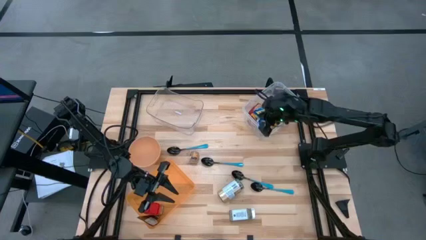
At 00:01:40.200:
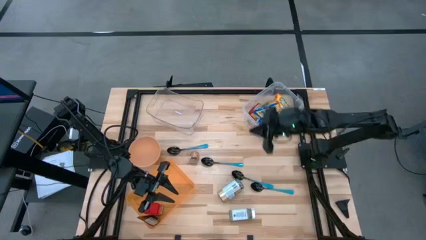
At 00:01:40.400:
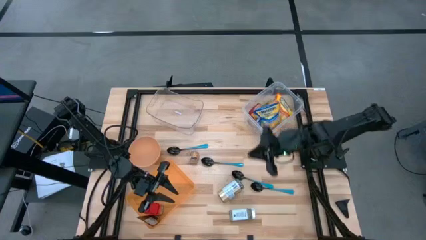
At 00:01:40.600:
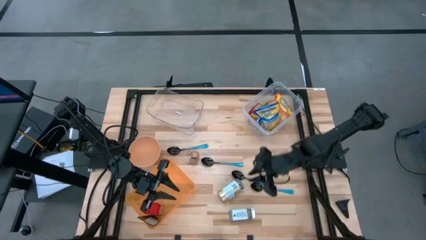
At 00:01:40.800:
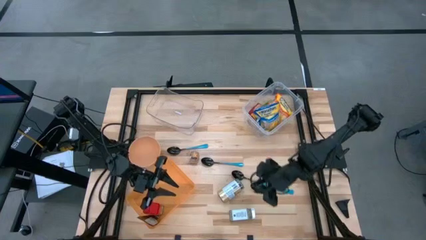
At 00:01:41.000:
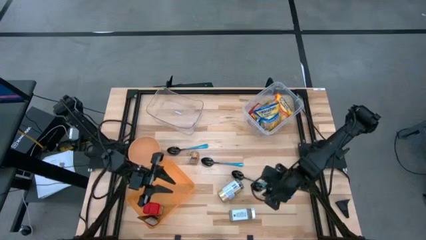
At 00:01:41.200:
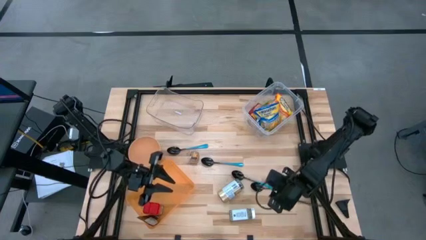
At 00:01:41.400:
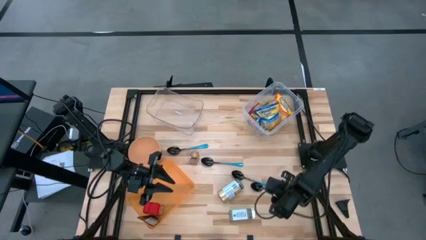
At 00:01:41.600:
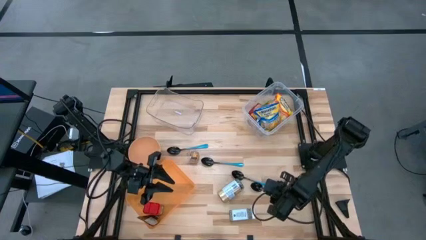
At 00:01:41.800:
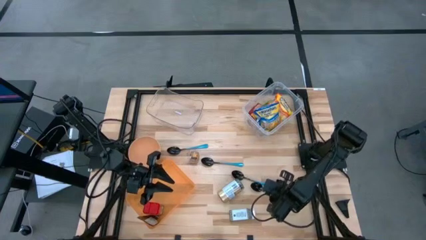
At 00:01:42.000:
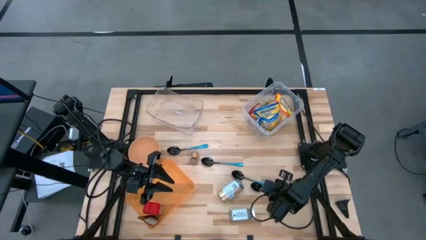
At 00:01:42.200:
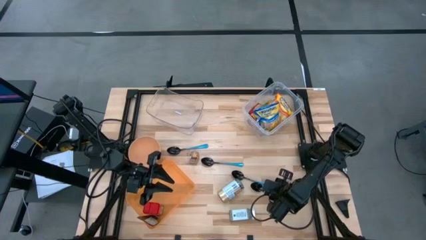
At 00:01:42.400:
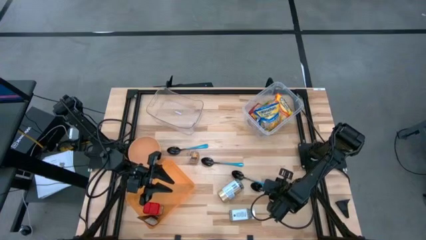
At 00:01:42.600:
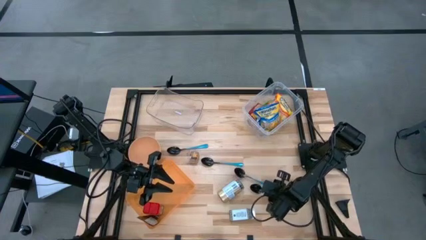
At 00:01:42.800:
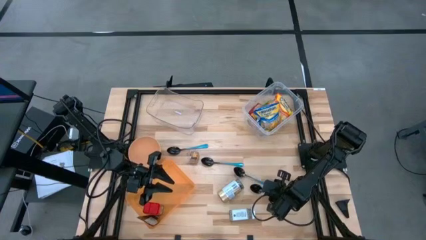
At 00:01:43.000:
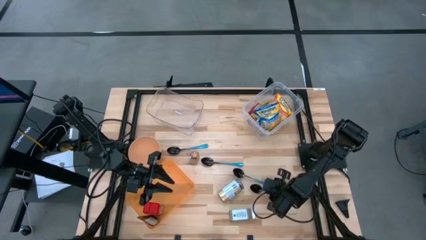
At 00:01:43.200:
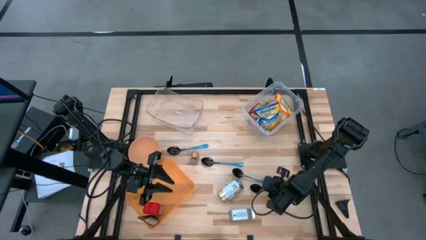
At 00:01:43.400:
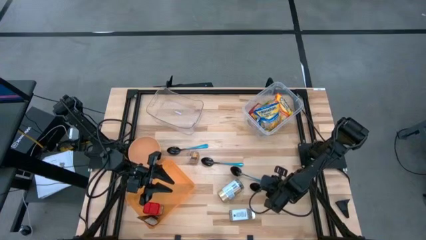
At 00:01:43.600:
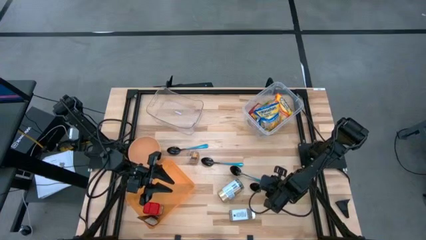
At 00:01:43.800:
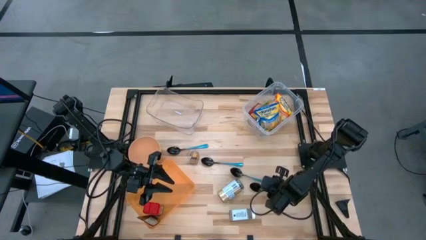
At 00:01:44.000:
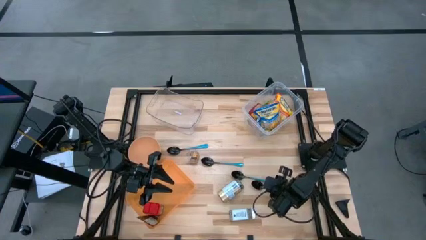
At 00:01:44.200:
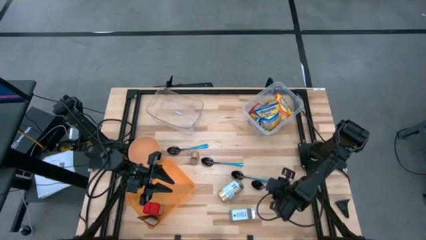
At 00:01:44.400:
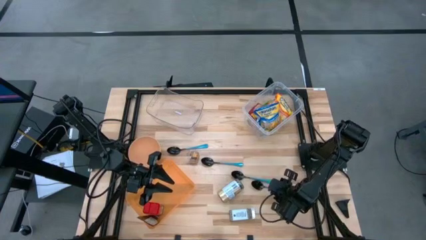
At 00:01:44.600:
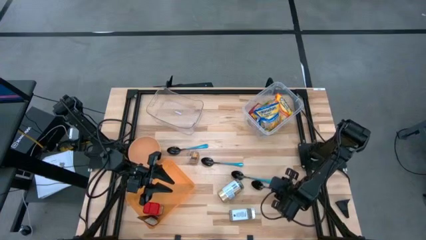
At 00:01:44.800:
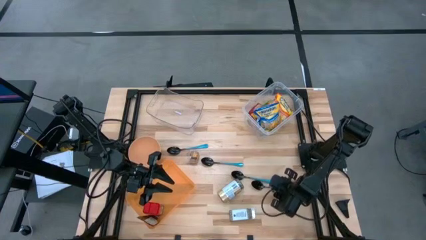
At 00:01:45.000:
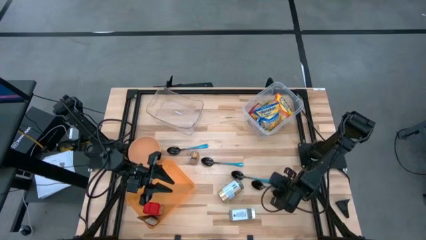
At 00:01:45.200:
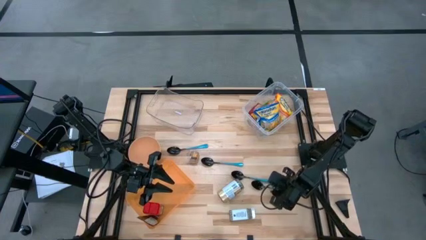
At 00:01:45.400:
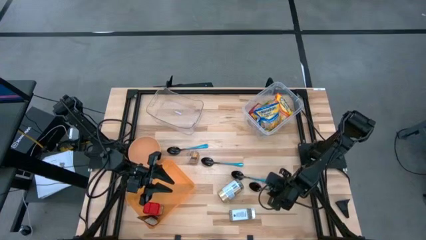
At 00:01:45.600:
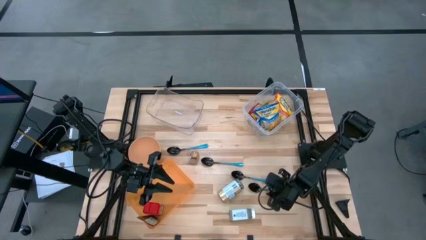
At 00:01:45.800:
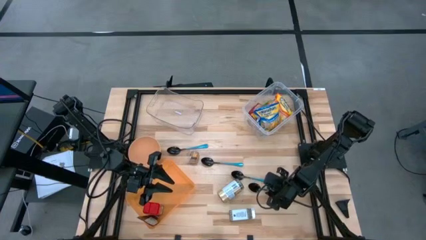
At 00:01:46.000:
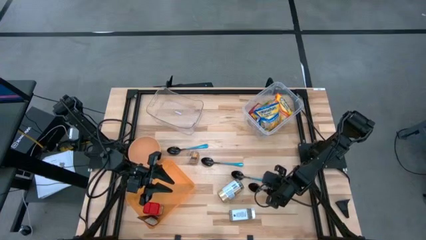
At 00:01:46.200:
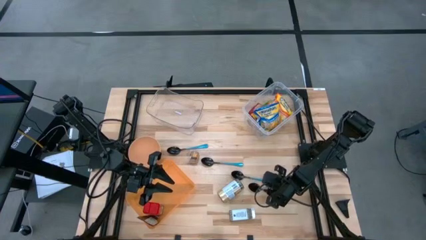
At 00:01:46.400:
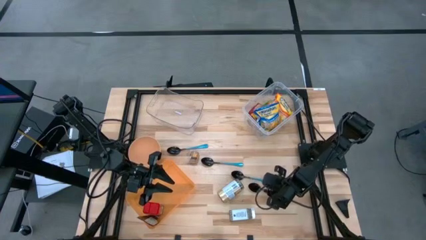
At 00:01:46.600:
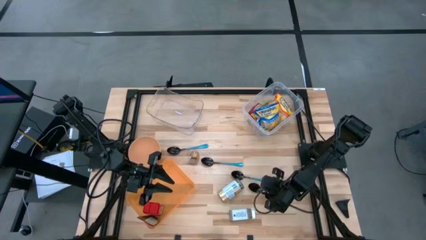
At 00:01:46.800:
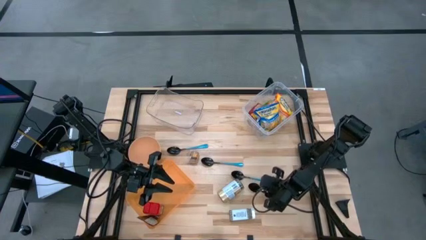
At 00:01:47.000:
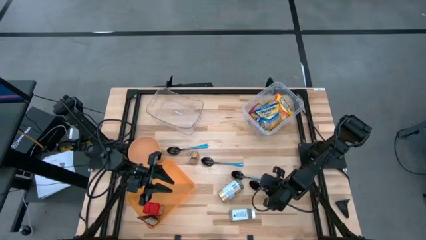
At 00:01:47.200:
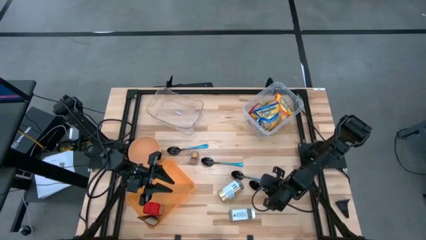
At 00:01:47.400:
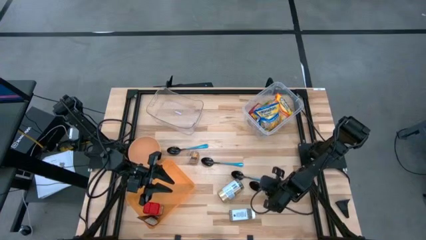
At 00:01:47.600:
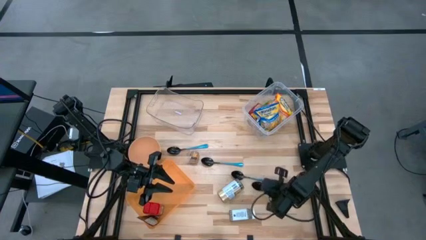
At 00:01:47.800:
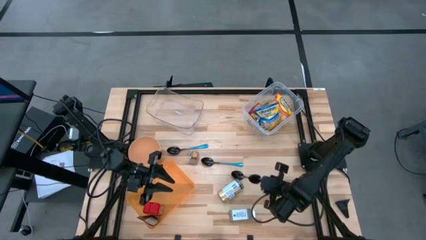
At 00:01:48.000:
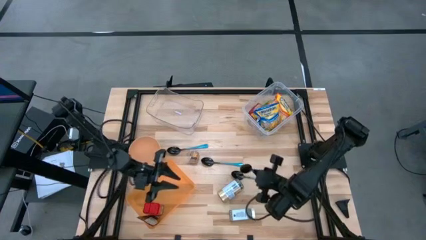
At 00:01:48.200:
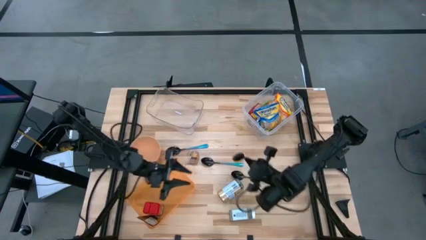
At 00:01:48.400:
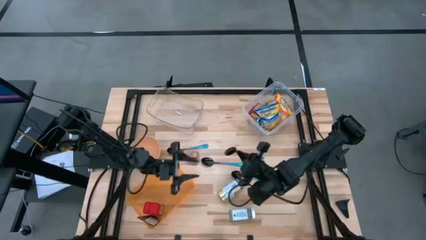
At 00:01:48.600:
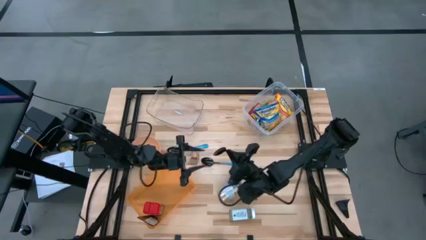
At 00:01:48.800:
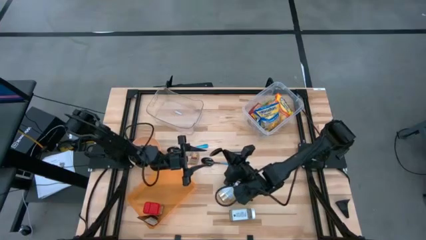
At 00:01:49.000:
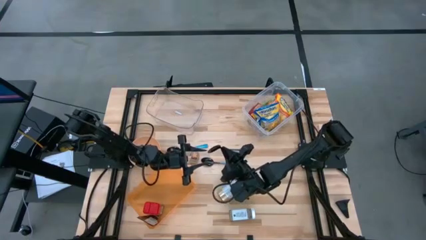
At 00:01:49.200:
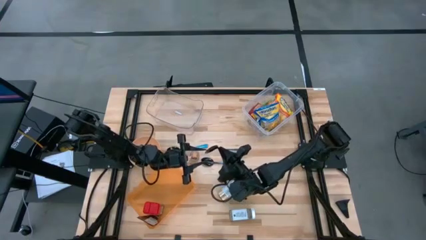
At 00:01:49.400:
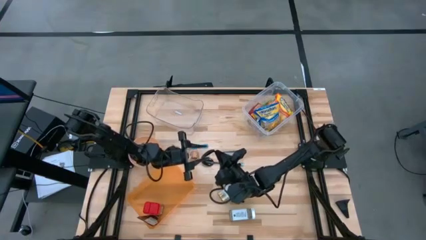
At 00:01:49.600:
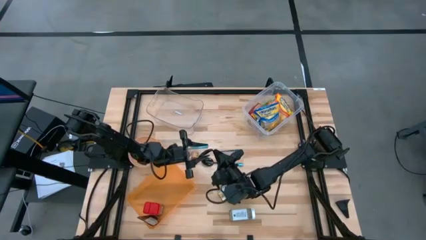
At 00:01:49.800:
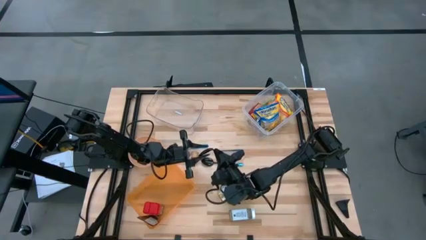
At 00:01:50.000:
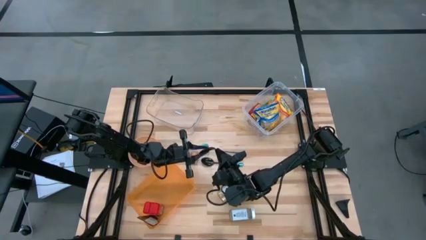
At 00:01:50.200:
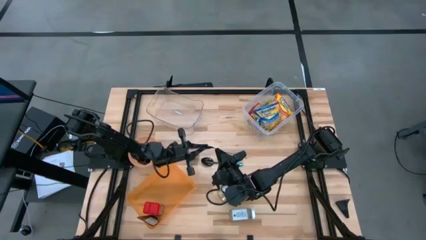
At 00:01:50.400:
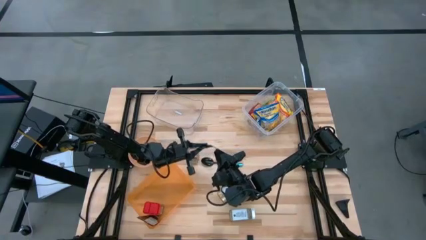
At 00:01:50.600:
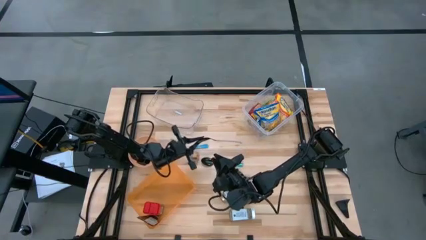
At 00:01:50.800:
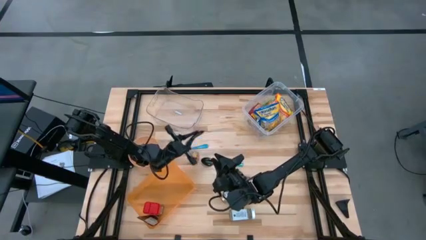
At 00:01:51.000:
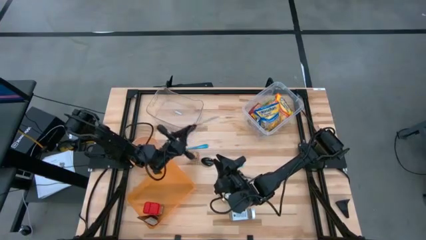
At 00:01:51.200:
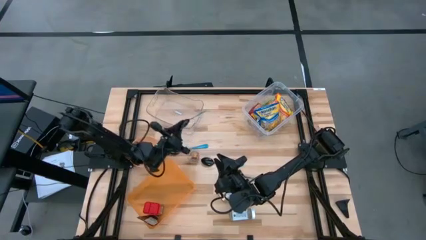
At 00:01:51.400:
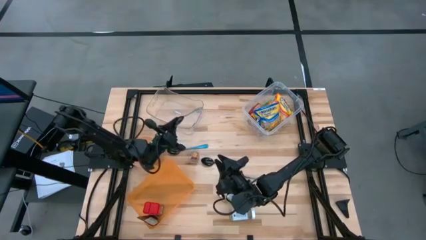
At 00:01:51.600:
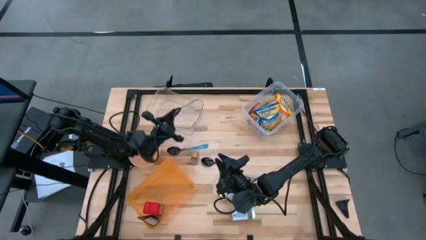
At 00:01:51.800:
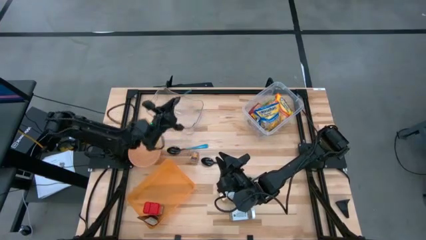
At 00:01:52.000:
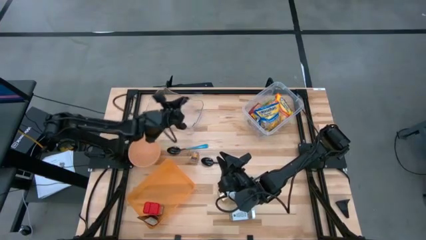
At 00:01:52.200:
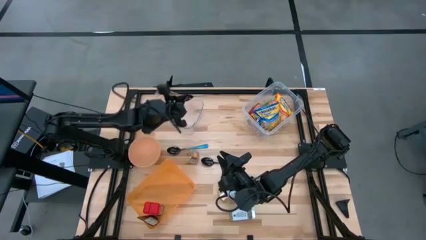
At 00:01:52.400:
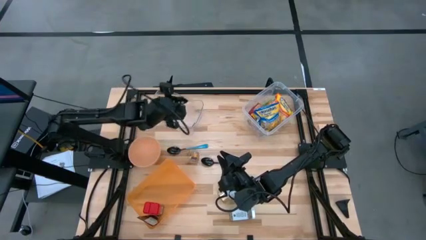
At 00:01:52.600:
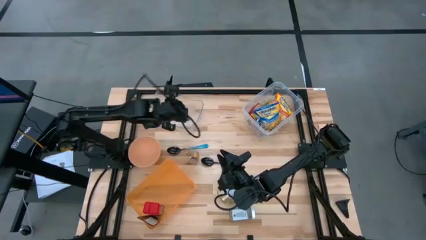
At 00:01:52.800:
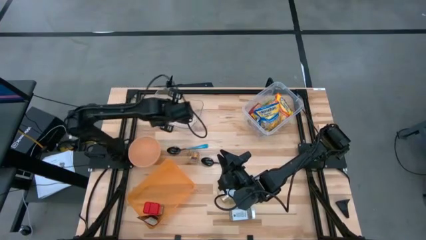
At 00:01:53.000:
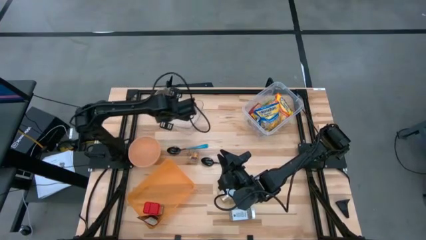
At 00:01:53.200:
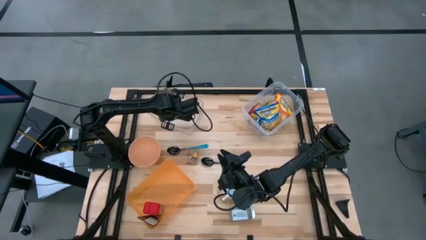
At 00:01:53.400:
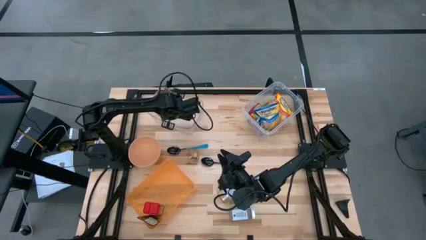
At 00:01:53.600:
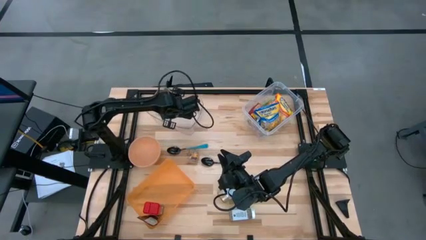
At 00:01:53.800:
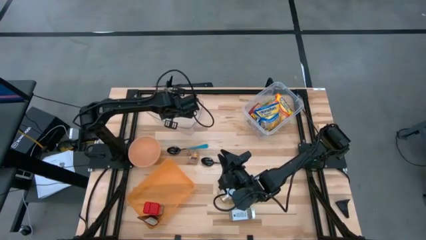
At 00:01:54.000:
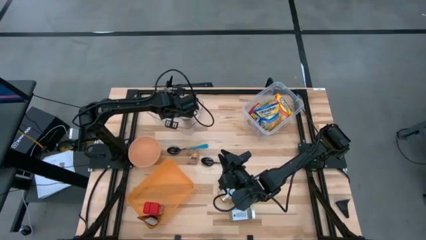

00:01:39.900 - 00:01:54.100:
Task: Pick & Place Food Item
Put the blue spoon into the left transparent bin
